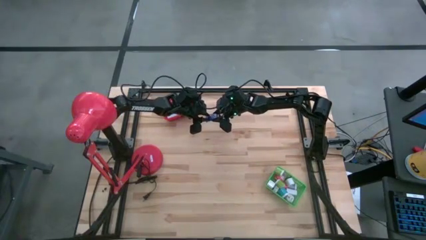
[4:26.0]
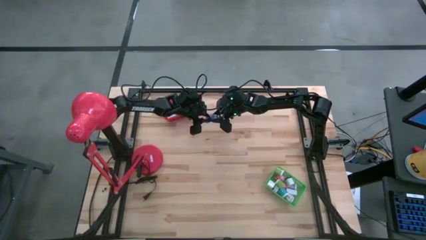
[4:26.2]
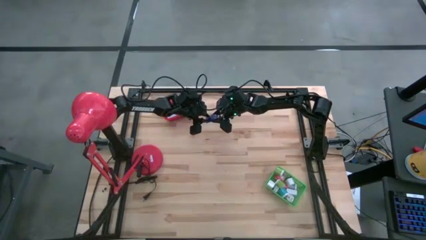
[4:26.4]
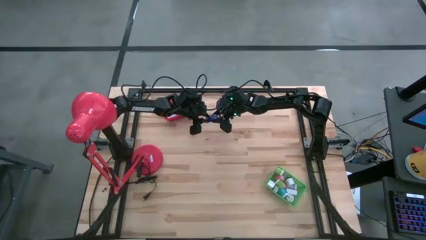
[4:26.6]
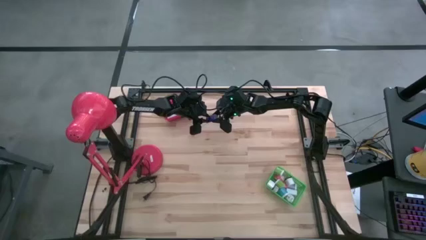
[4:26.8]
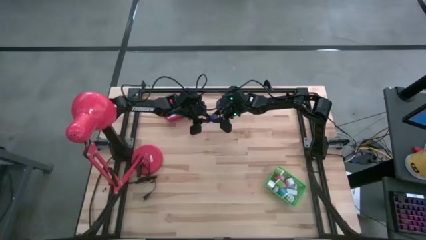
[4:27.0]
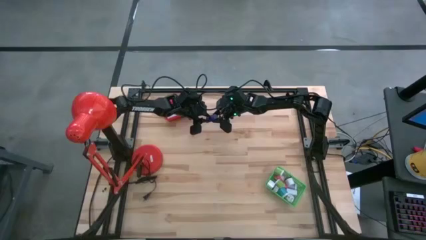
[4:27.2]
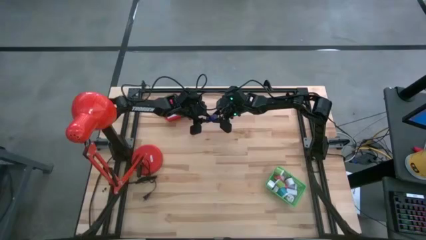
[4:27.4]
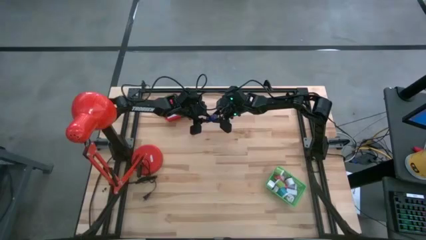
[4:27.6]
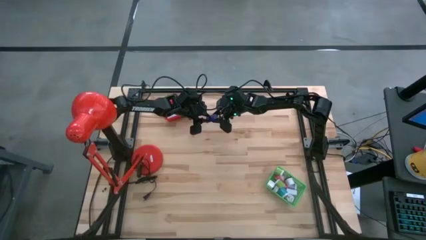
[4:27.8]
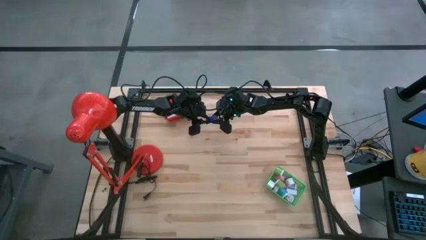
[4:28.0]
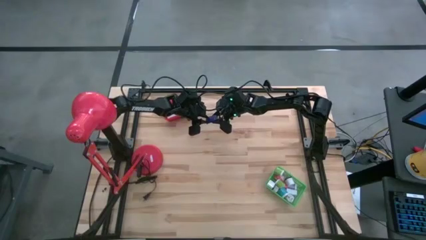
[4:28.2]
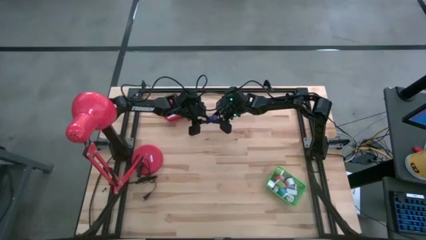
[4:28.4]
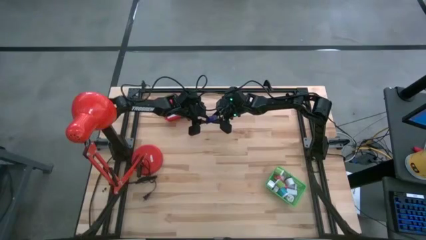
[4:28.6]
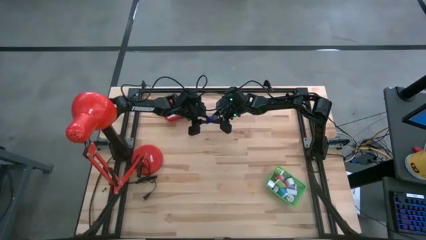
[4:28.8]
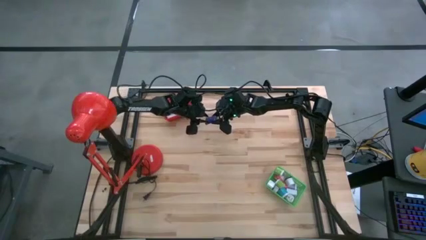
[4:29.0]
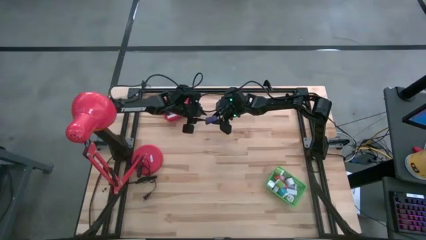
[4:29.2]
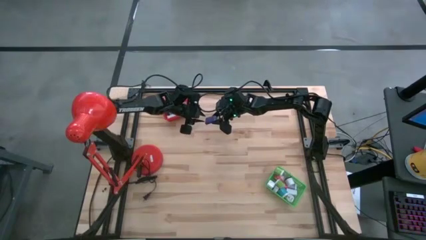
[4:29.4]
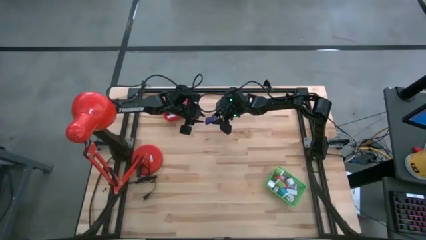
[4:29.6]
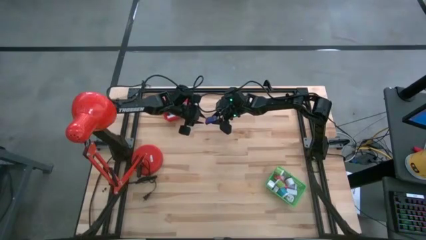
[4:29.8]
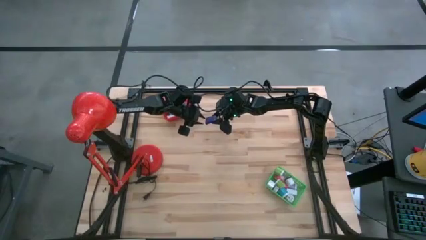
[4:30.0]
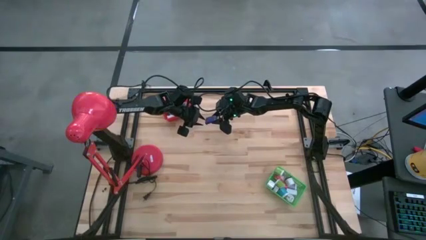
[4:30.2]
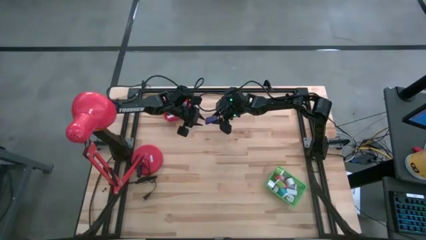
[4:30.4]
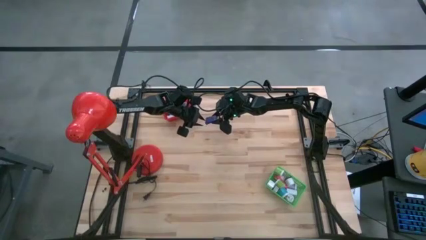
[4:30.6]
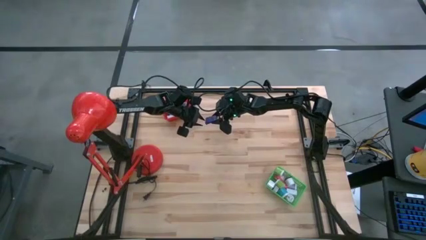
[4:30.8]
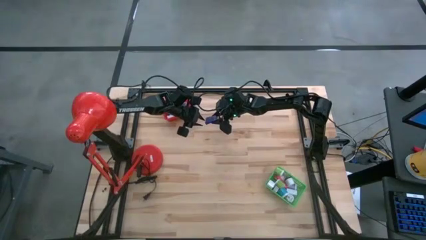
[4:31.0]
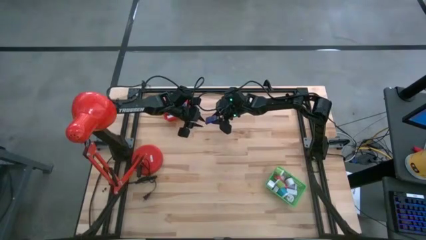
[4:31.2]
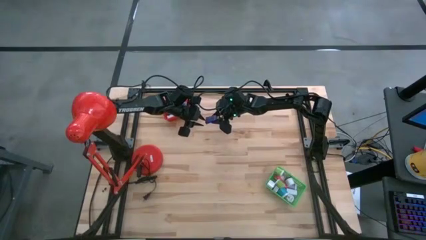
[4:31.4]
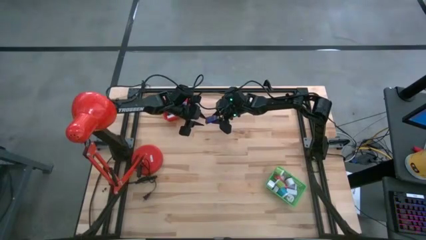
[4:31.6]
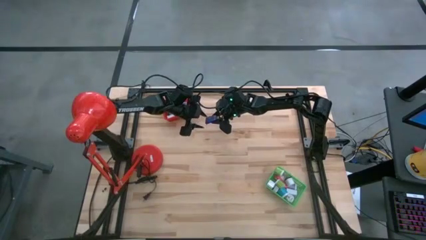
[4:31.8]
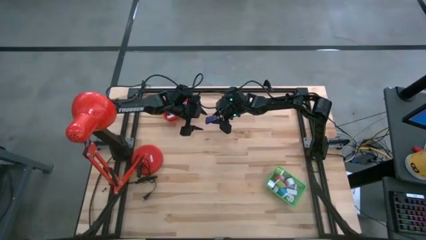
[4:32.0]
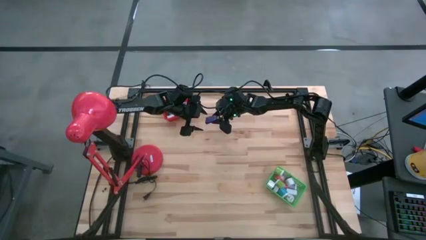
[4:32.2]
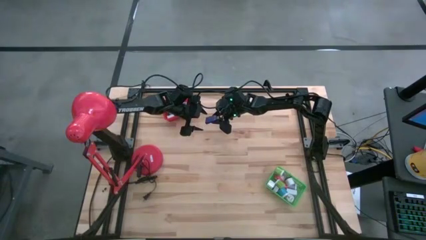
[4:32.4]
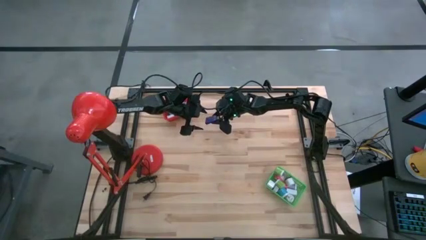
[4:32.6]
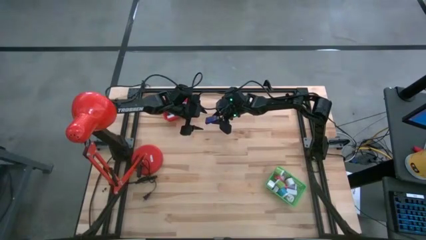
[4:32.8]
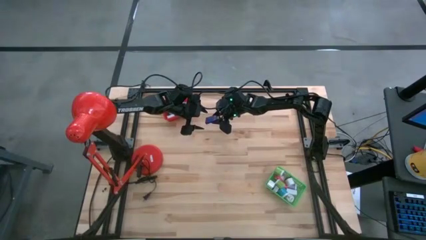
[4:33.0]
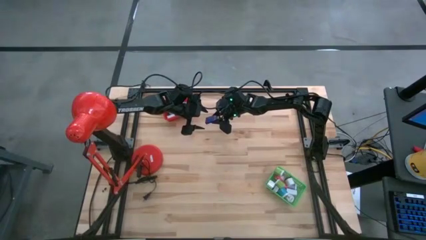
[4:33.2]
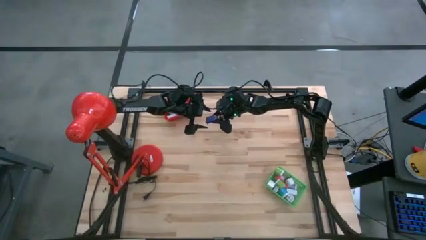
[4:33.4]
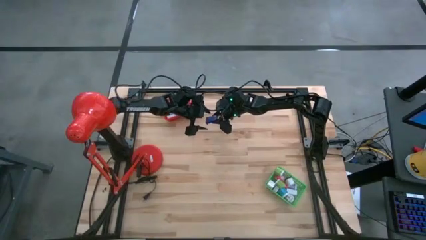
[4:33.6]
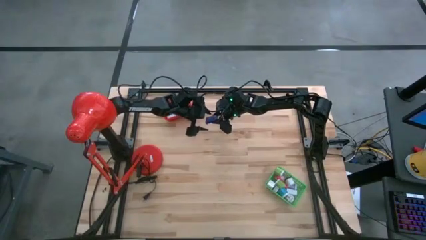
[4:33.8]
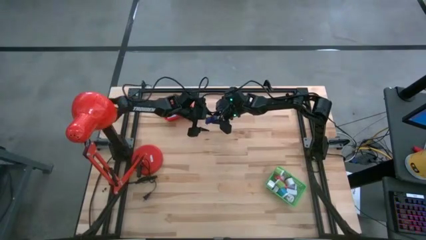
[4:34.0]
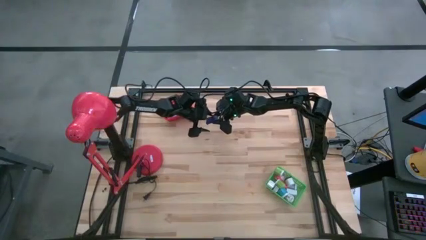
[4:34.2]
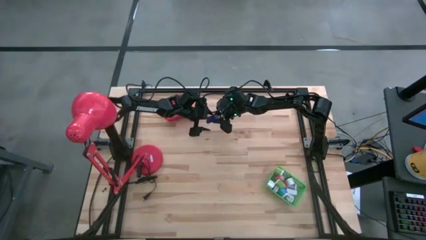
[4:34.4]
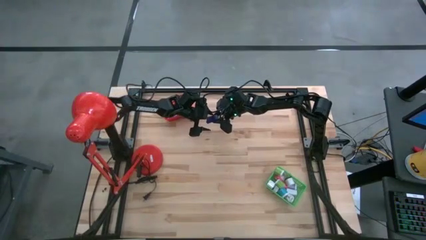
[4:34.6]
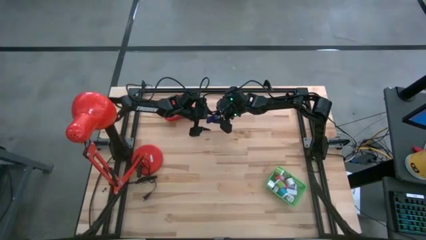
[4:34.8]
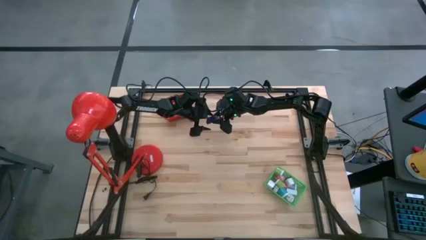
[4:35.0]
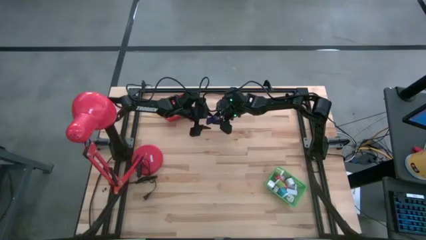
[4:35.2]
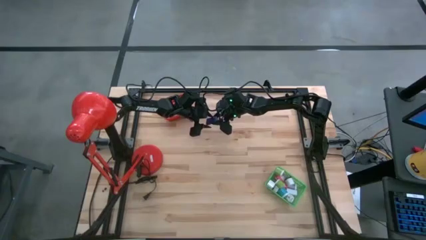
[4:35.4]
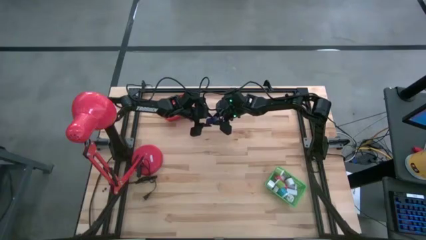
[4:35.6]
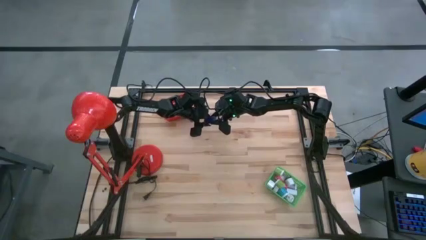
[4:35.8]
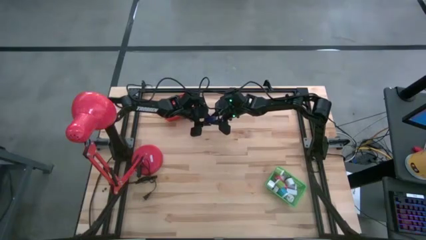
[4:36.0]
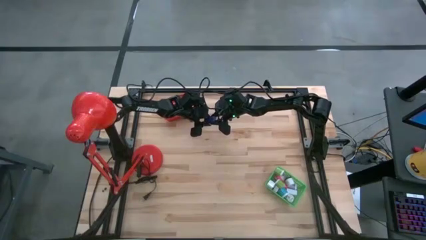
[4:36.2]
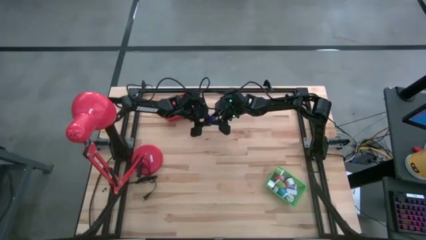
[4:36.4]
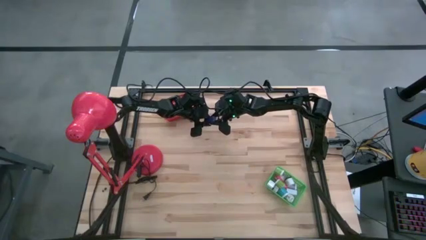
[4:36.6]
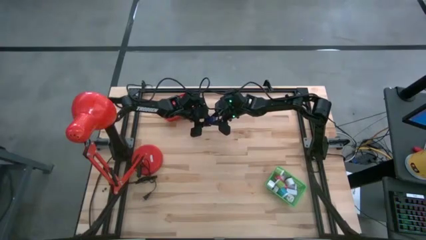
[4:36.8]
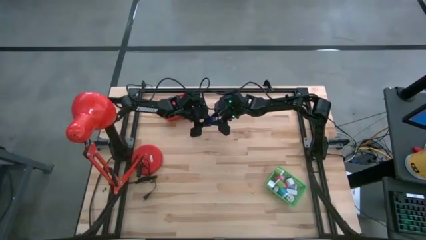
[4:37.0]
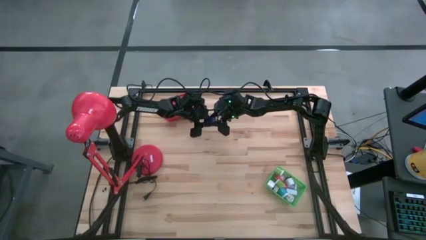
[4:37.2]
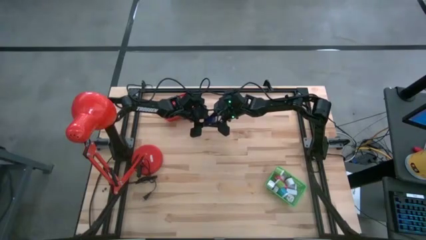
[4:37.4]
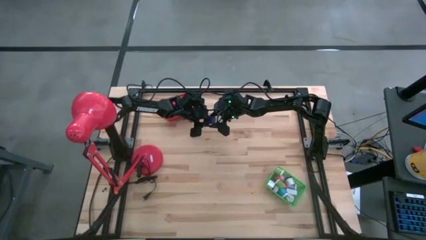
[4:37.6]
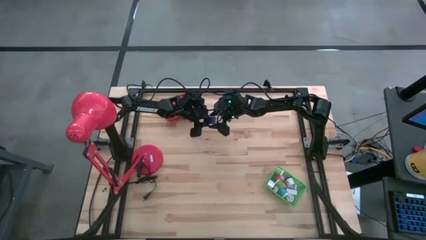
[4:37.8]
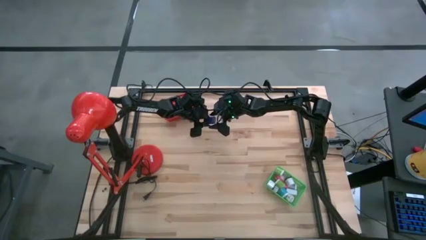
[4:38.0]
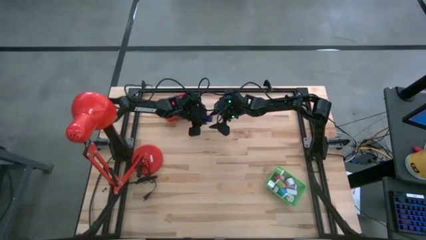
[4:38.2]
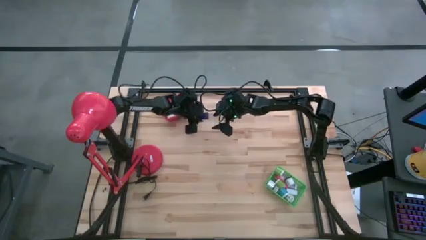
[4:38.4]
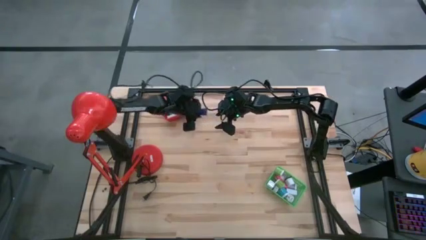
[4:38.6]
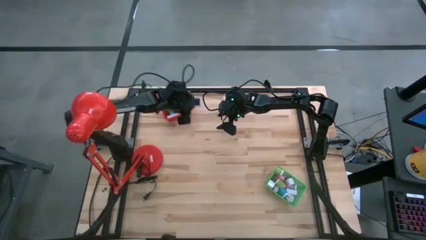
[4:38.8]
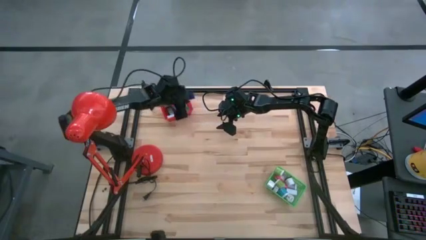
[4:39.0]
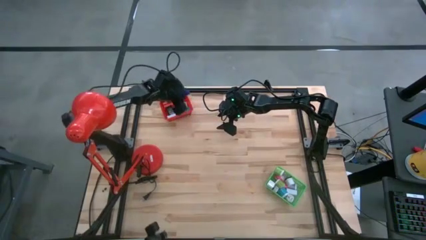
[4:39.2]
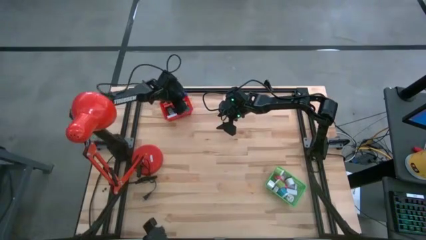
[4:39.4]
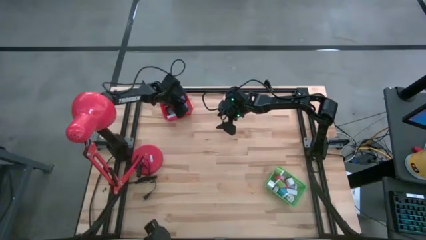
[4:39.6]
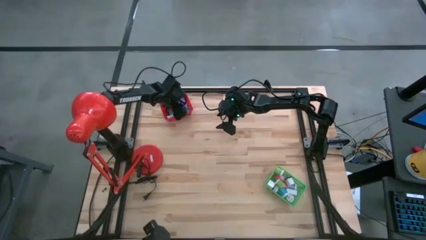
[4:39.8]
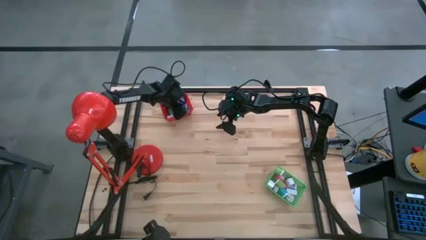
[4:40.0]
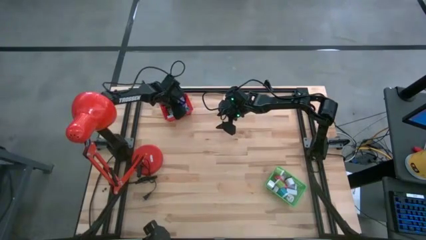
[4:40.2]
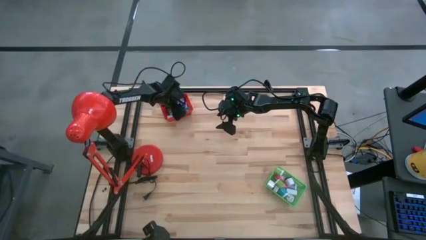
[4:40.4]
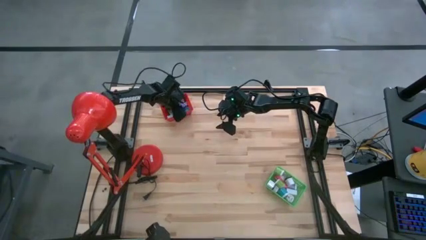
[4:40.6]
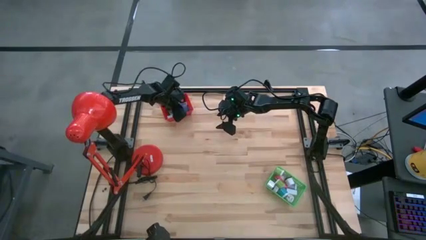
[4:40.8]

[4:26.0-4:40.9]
Task: Pick & Place Office items
Put the dark blue digital clock into the red bin

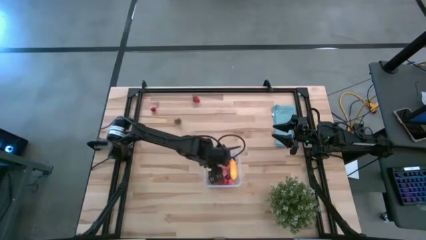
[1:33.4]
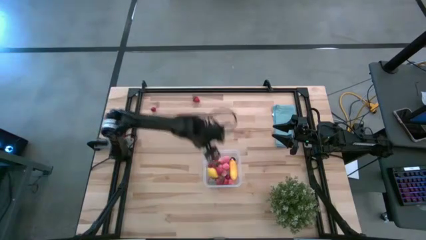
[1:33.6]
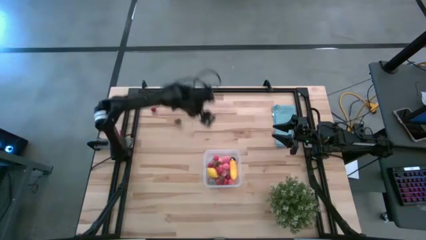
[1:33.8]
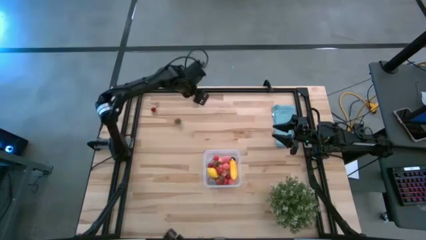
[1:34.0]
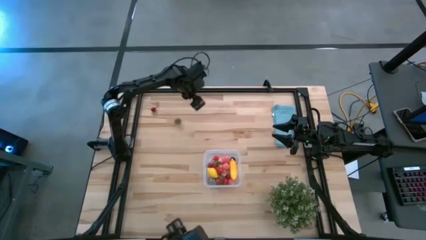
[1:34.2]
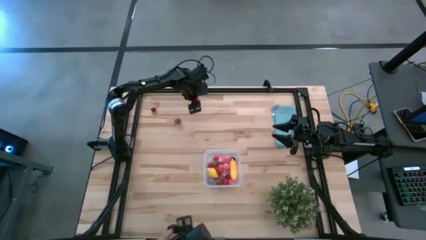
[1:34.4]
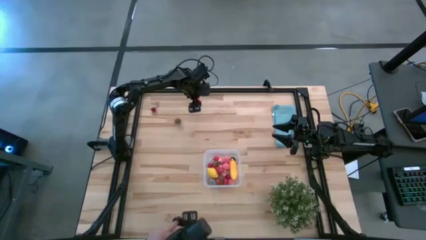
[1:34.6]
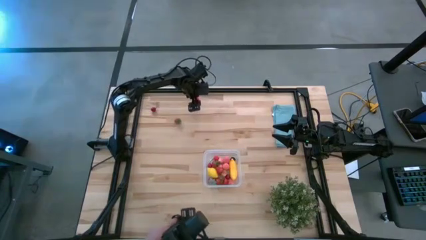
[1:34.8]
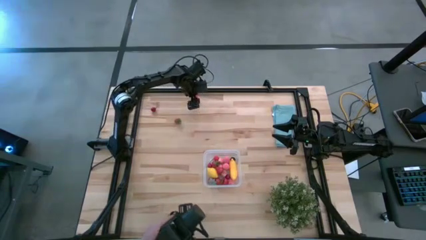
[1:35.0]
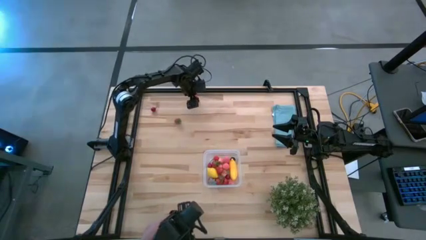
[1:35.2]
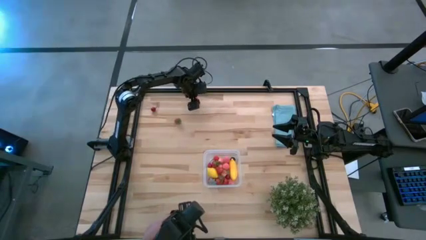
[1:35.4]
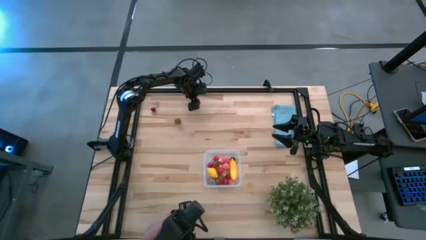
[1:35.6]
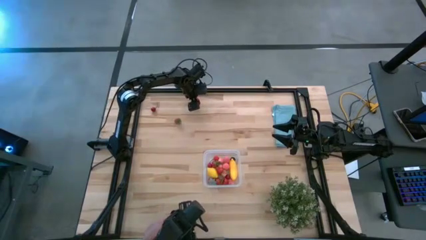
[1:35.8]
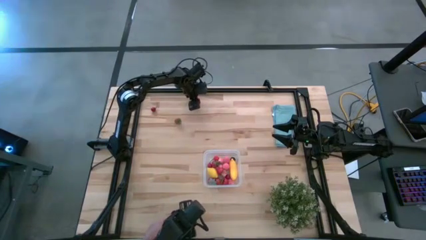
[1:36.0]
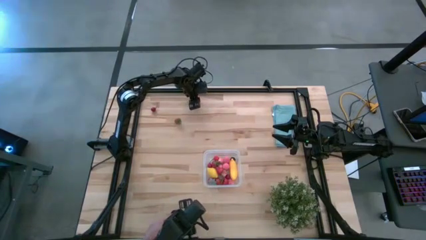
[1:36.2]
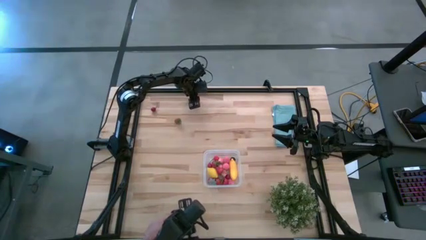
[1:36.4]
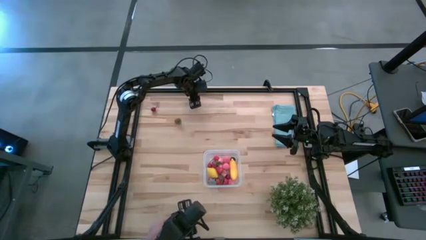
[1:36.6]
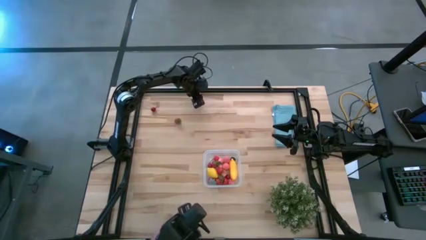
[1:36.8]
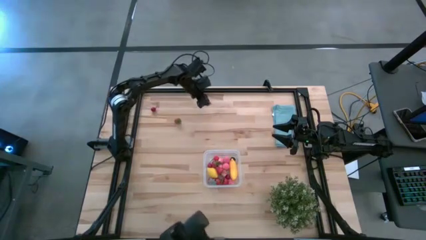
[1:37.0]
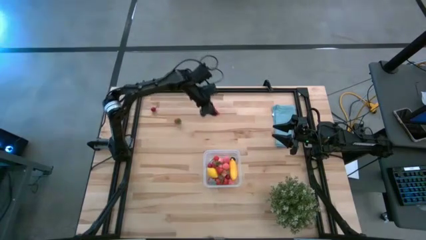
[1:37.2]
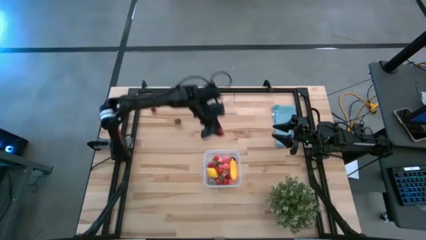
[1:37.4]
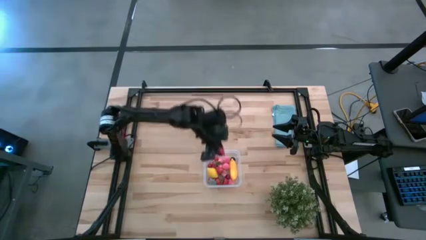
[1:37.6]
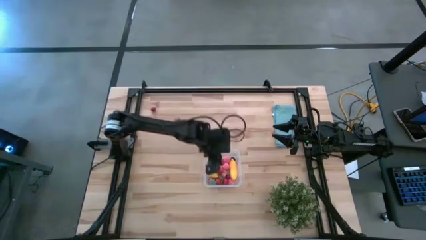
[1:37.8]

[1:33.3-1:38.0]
Task: Pick and placing Produce into tupperware
Put the red strawberry into the transparent bin
